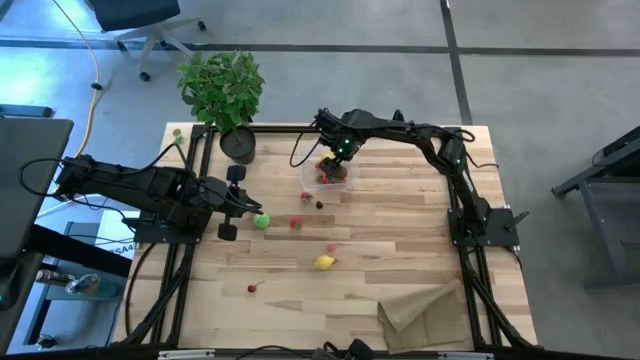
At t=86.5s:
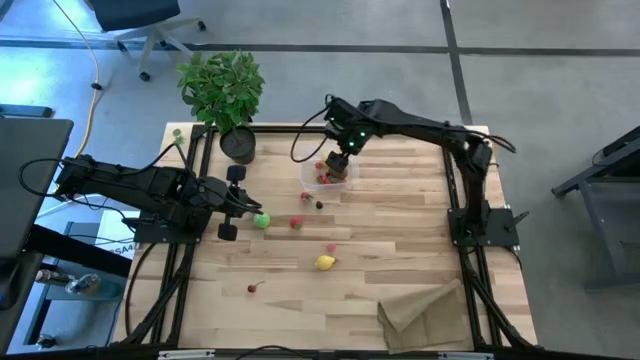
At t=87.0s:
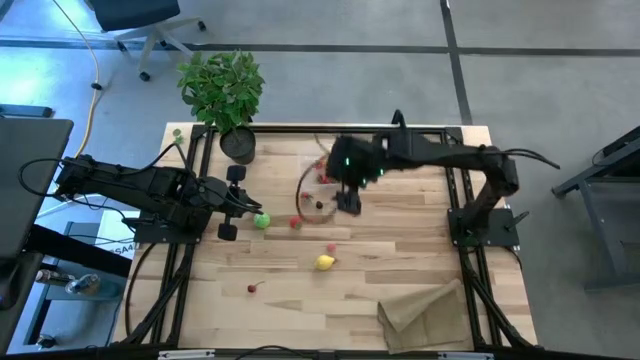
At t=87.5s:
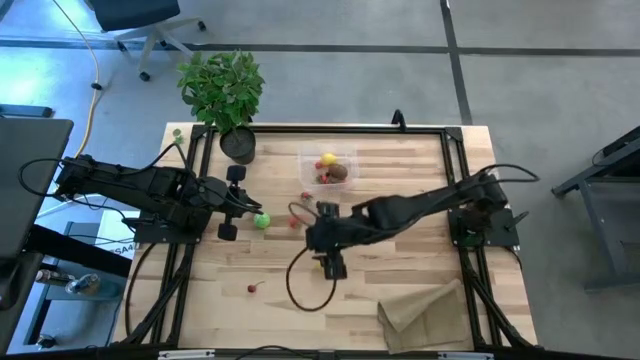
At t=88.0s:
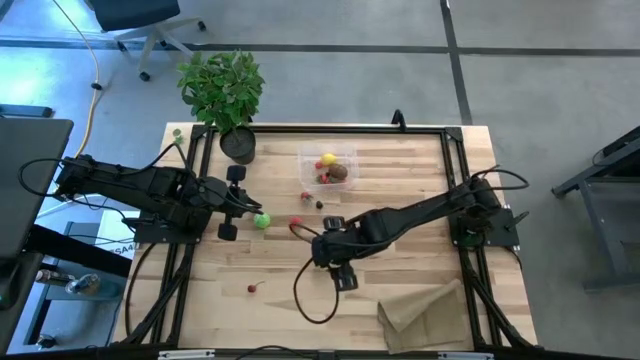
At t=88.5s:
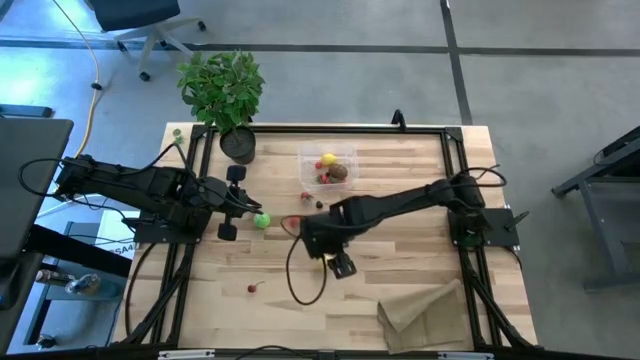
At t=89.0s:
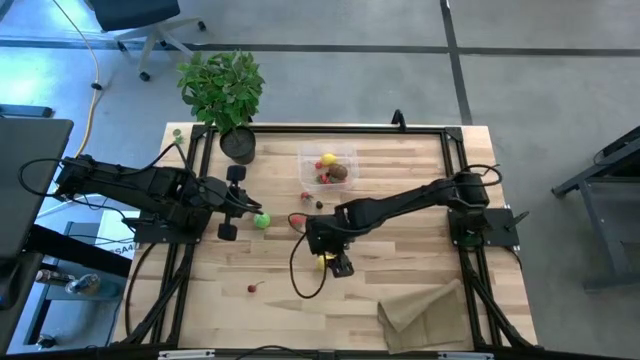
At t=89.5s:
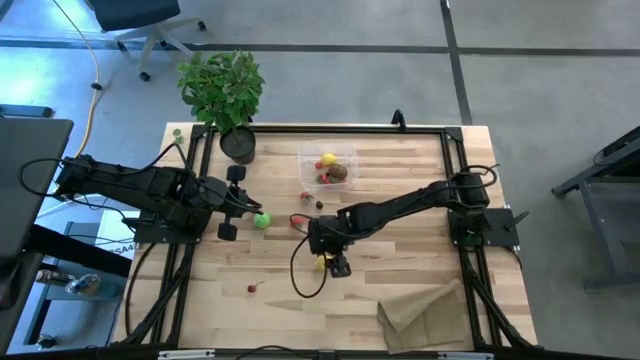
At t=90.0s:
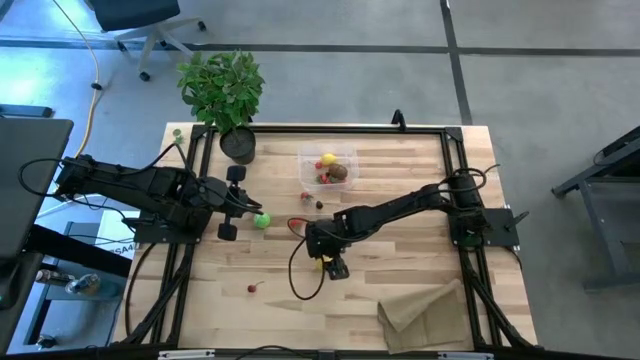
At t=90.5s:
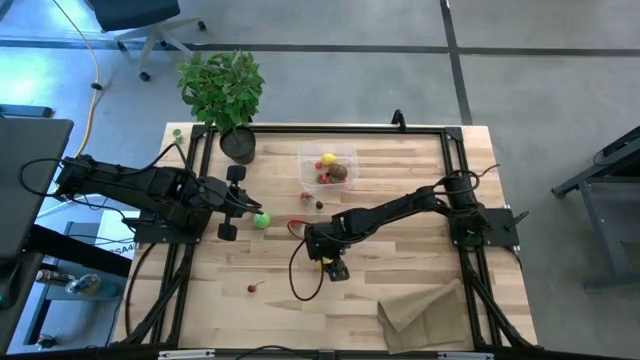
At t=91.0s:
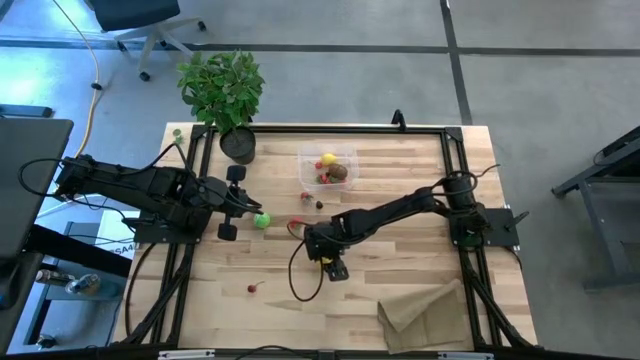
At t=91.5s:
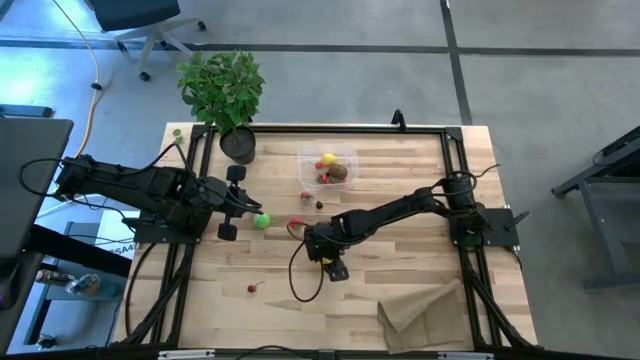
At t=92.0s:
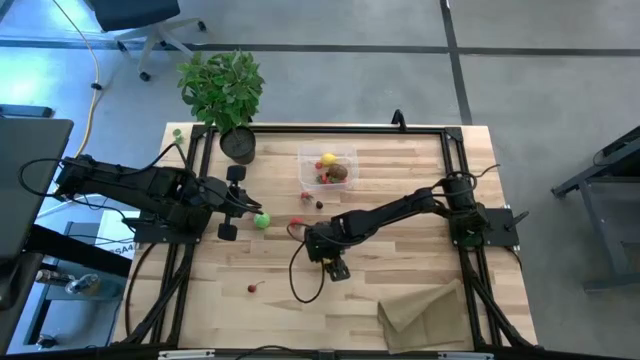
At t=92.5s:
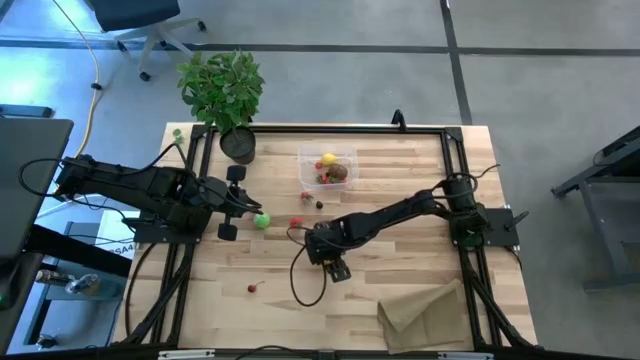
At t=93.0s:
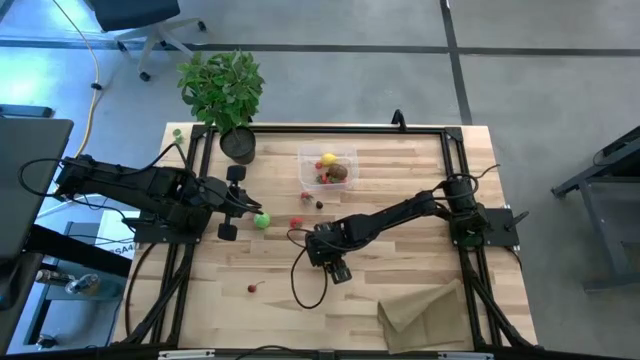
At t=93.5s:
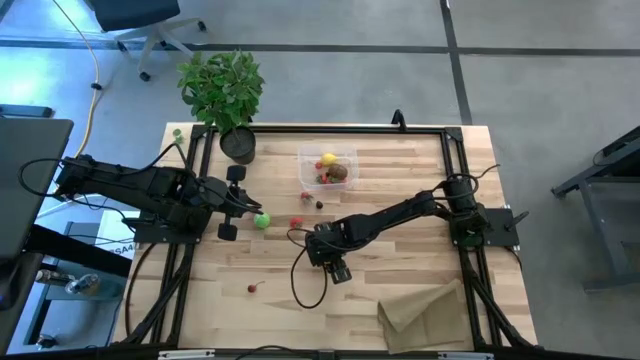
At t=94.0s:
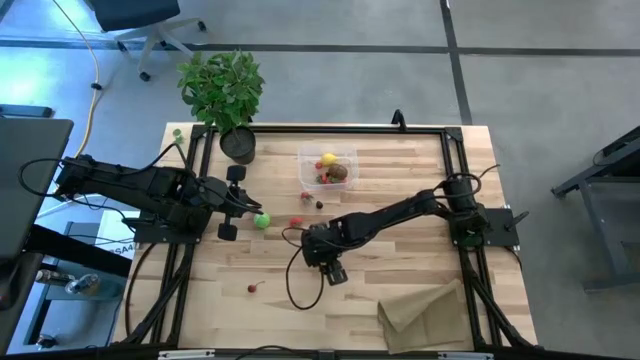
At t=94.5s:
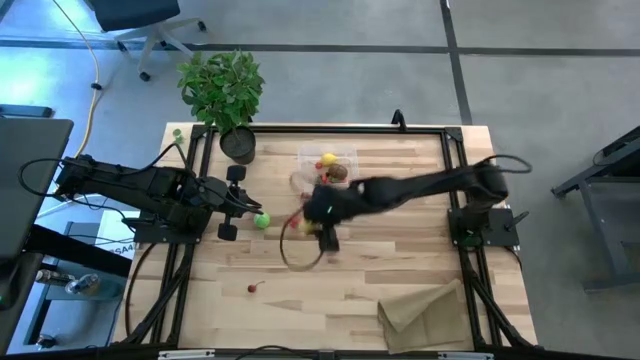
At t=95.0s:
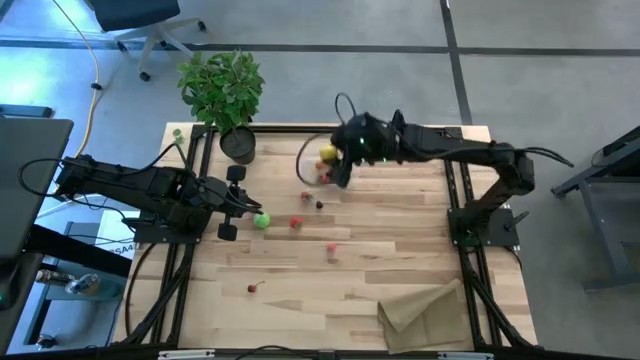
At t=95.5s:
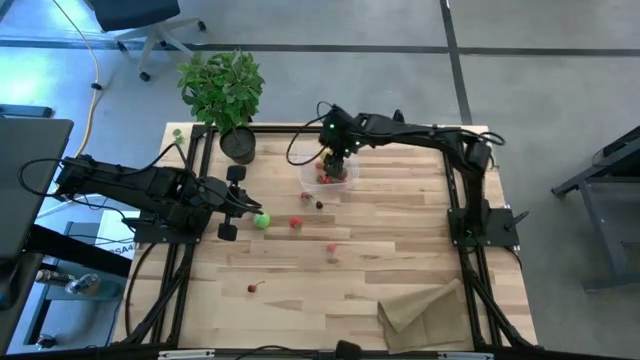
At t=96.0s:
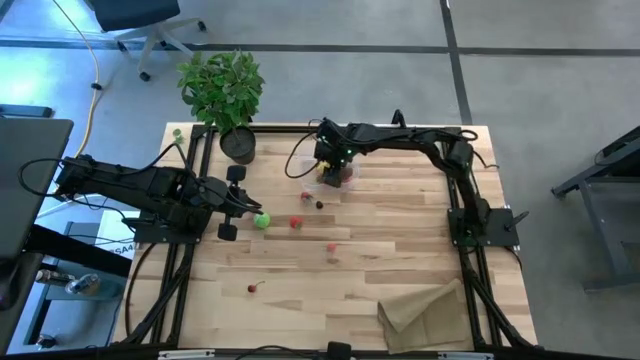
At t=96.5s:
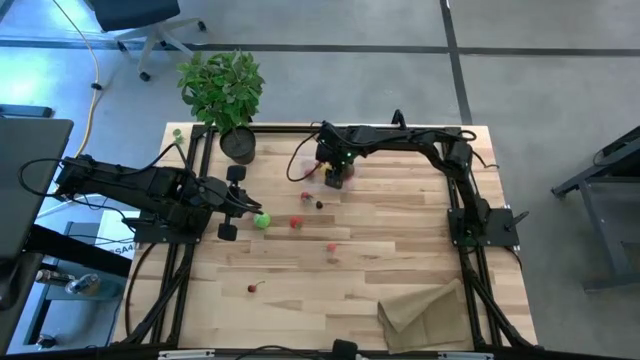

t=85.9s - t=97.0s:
Task: Pick and placing Produce into tupperware
Put the lemon into the transparent bin

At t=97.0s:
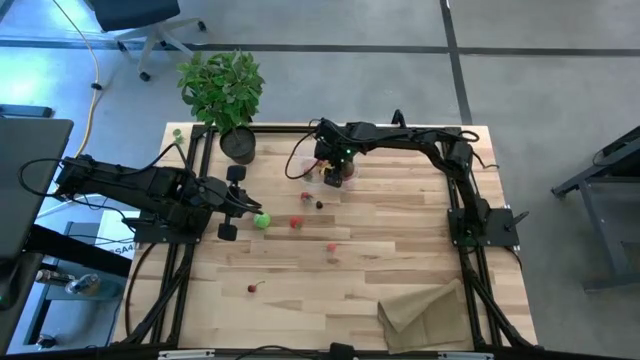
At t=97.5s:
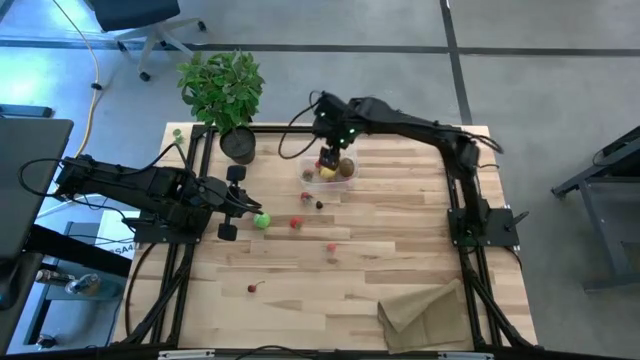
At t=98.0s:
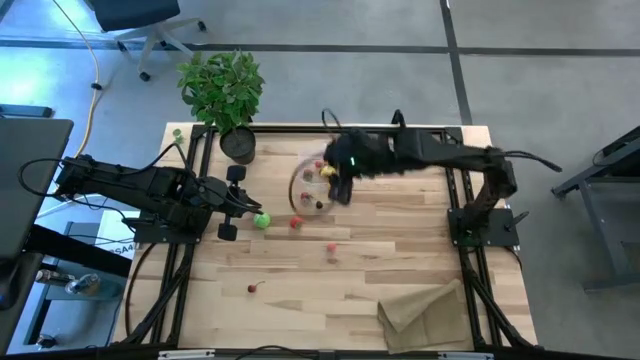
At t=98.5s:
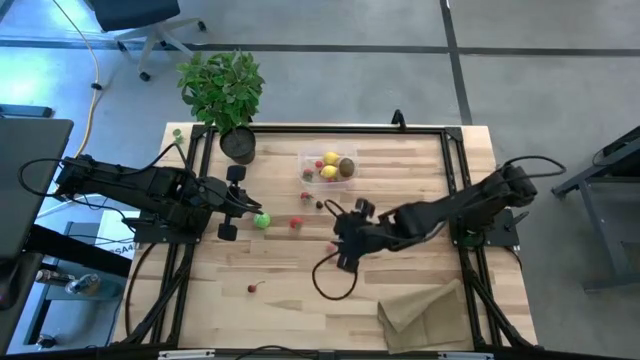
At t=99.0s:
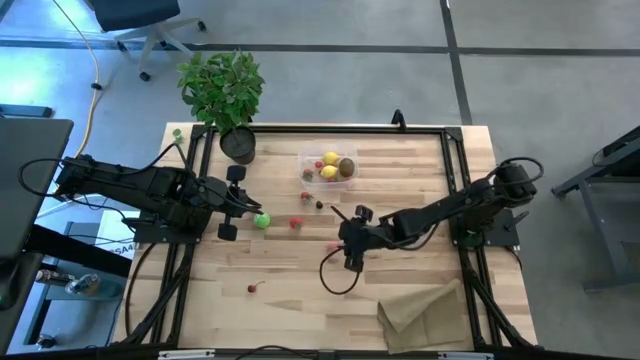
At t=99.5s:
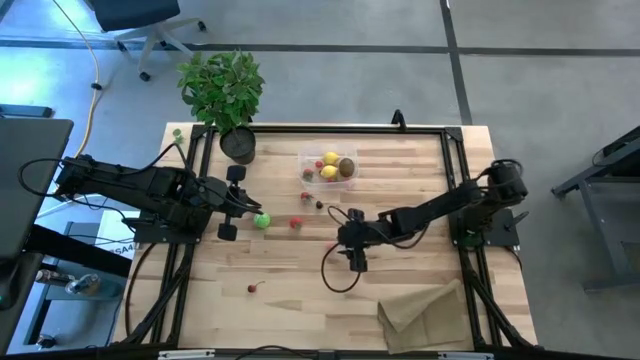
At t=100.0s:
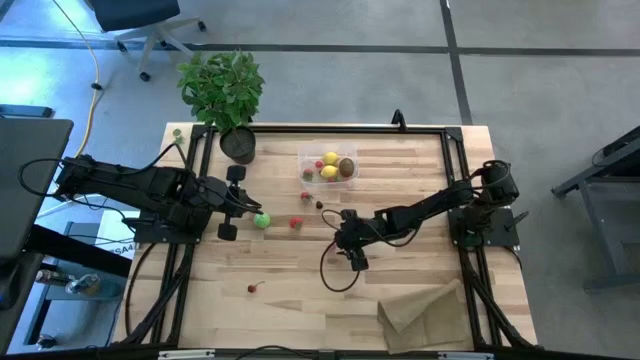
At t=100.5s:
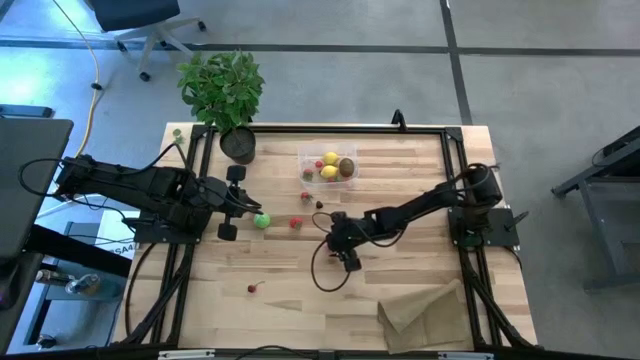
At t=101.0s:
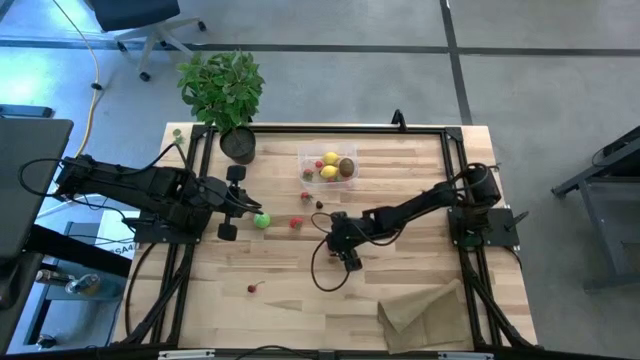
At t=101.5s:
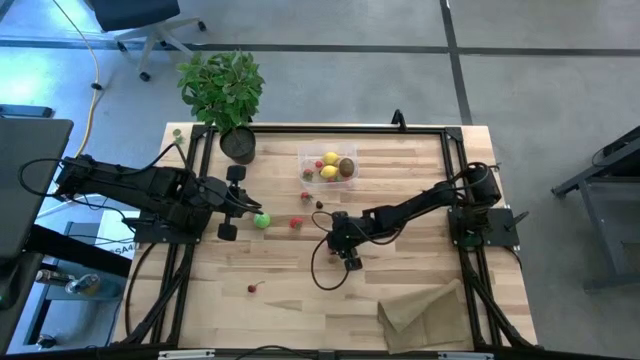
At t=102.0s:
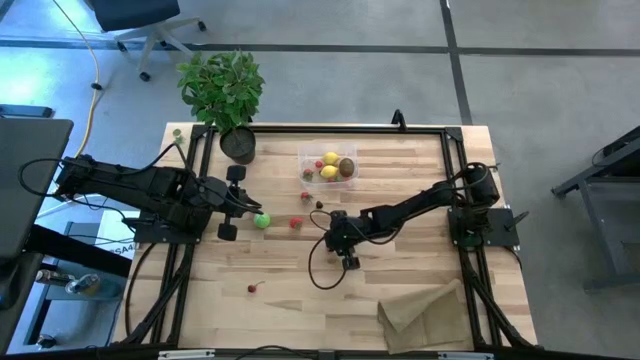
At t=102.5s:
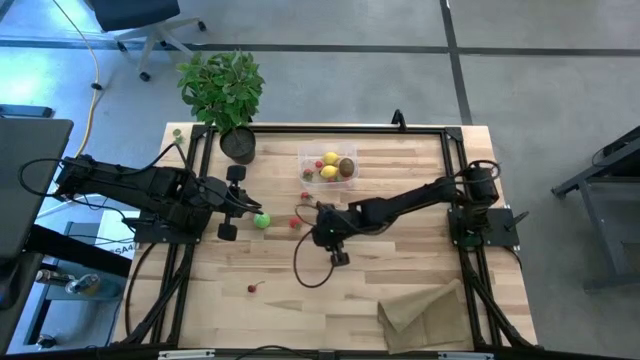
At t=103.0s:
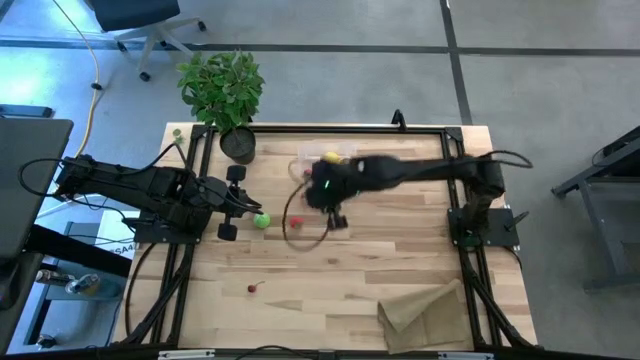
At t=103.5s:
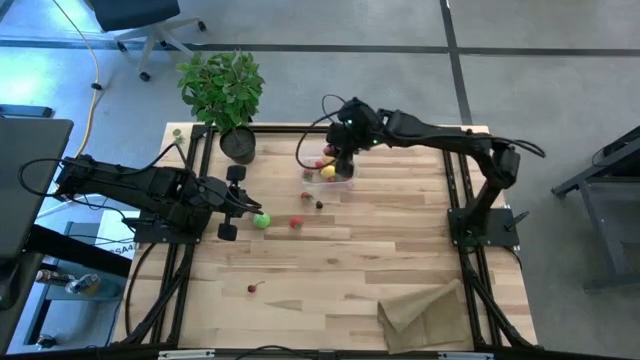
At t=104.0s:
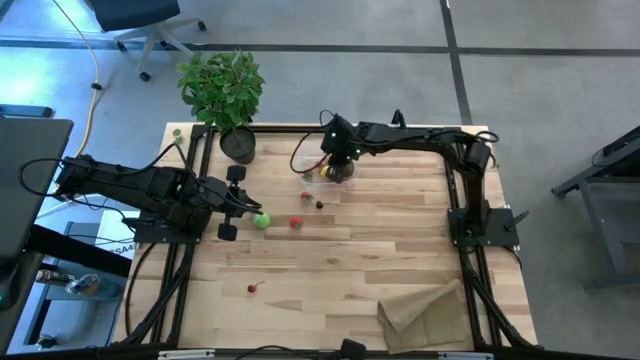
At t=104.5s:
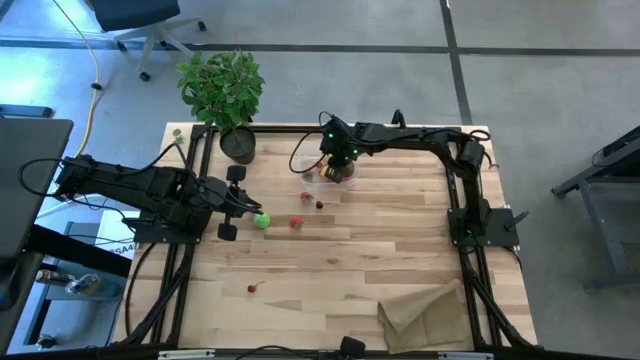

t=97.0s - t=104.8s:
Put the peach into the transparent bin

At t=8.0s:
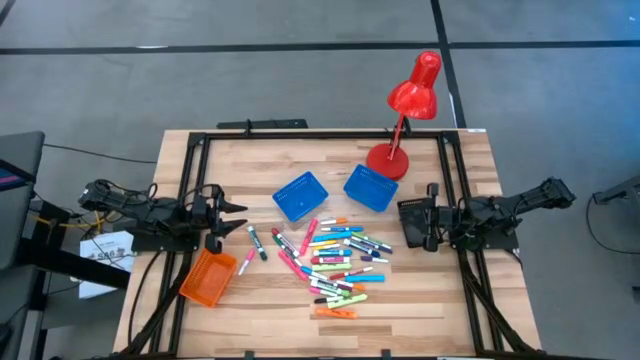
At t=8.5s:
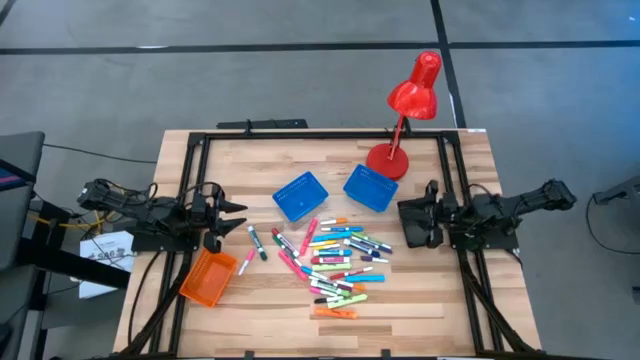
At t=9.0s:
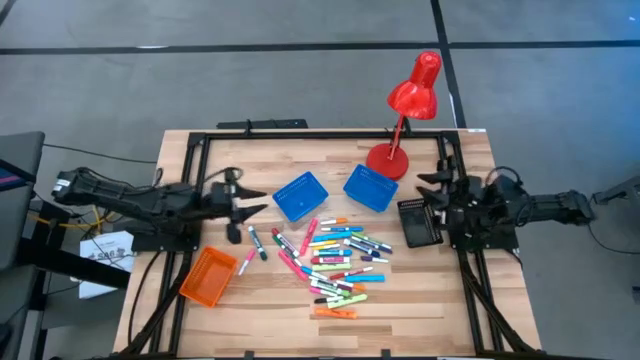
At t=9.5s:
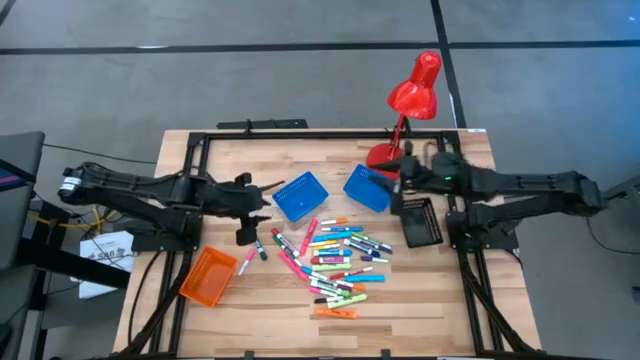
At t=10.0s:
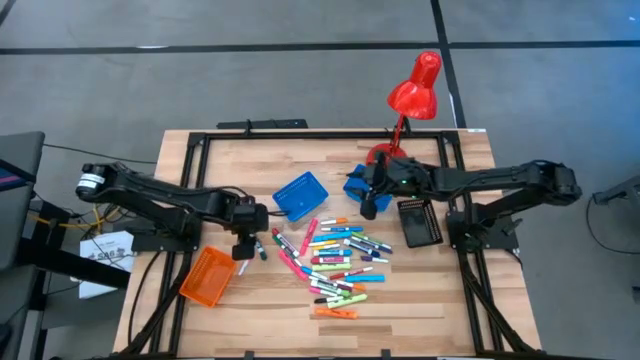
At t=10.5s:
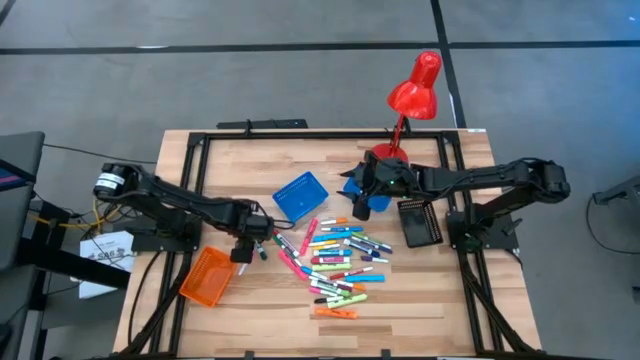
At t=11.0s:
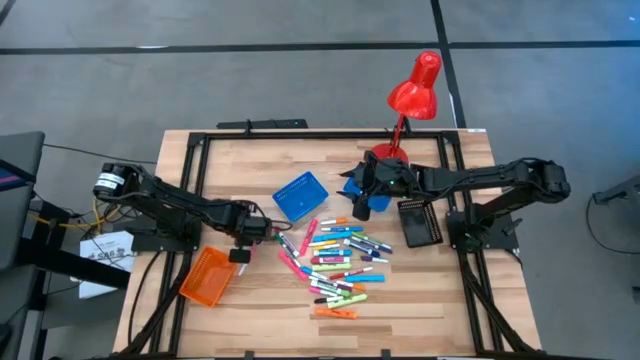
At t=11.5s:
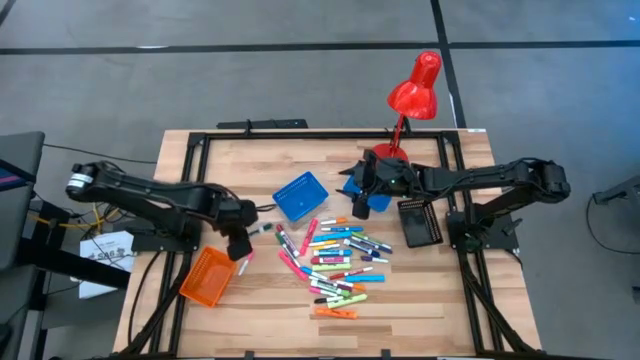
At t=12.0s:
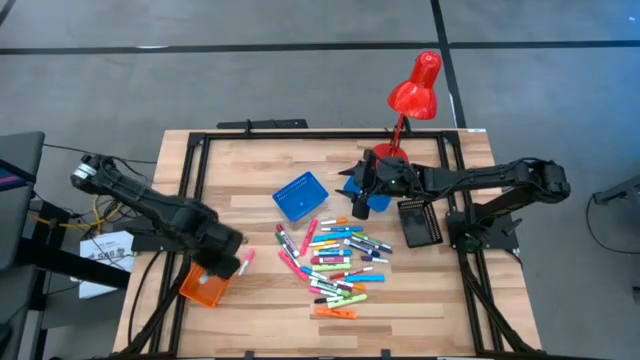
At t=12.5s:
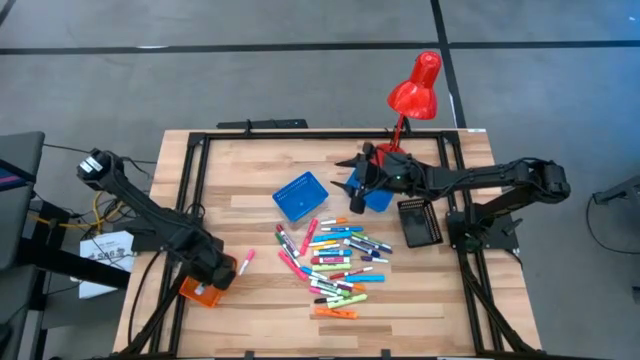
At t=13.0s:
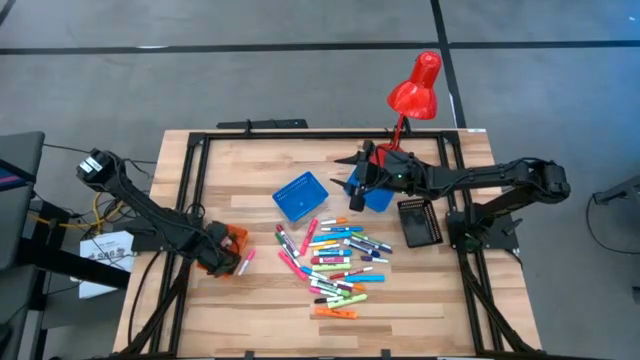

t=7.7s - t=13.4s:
Task: Pick & Place Markers
Put the large dark green marker pen into the orange bin
